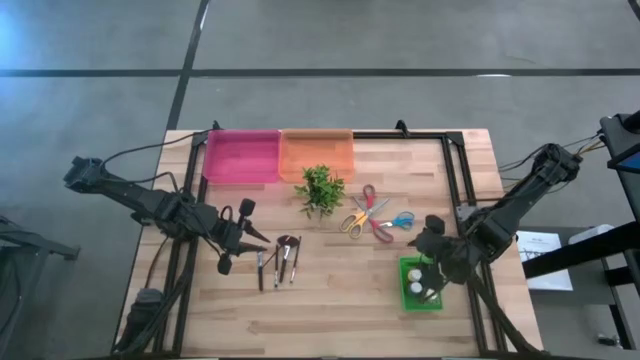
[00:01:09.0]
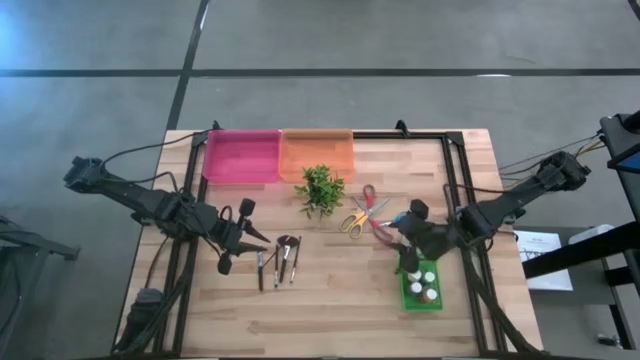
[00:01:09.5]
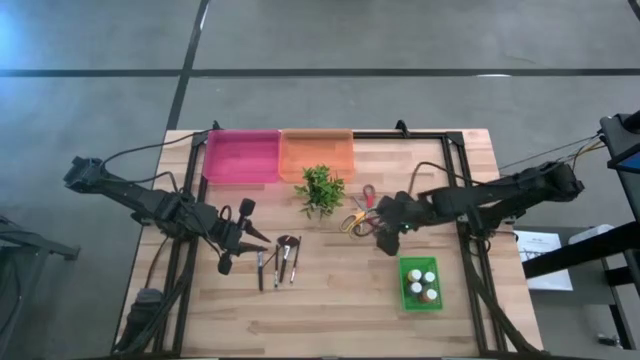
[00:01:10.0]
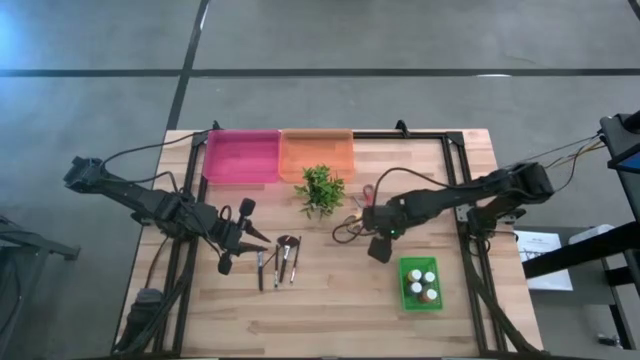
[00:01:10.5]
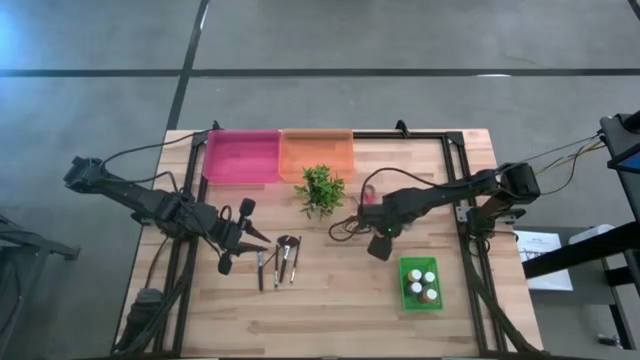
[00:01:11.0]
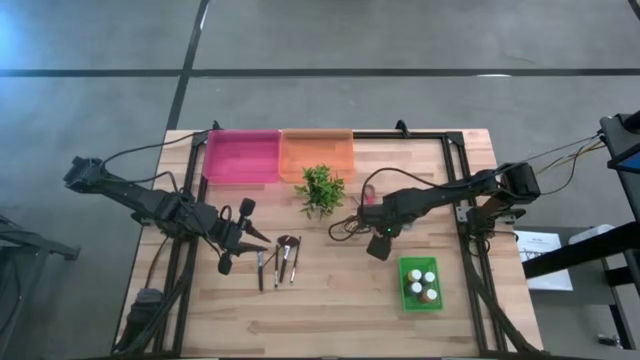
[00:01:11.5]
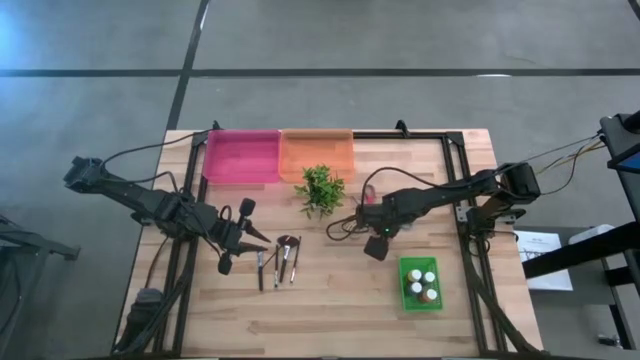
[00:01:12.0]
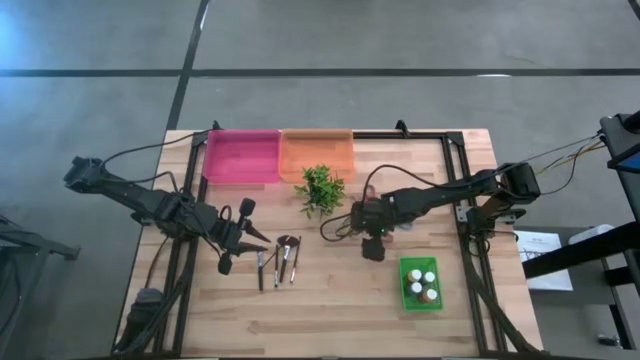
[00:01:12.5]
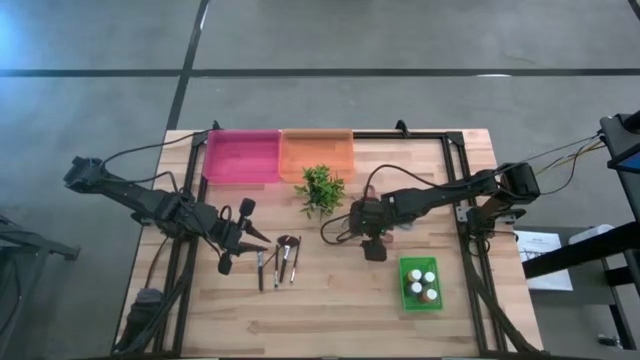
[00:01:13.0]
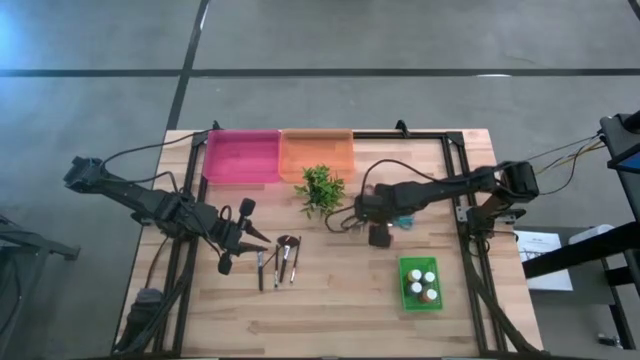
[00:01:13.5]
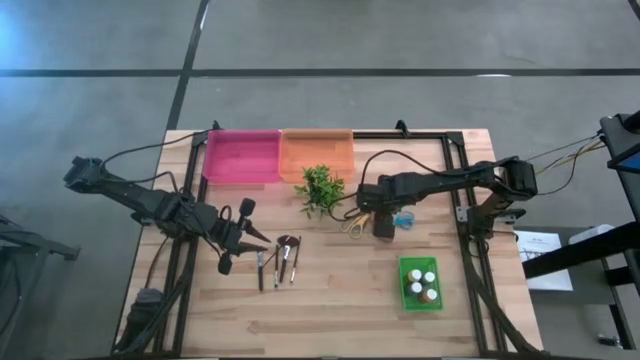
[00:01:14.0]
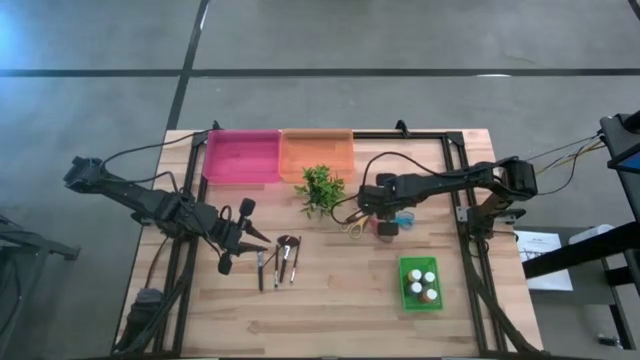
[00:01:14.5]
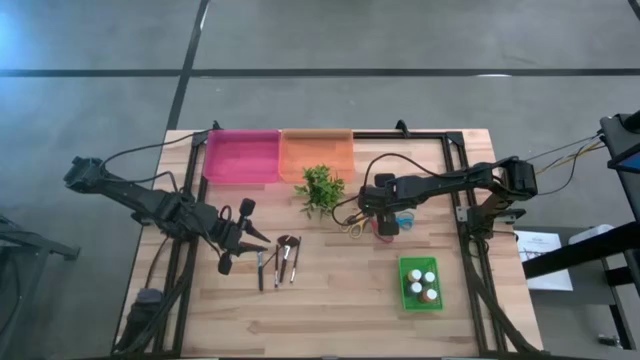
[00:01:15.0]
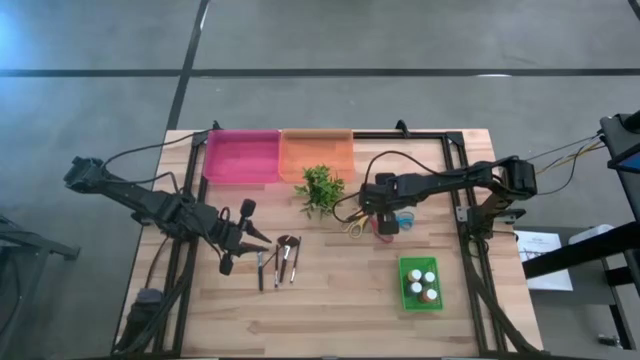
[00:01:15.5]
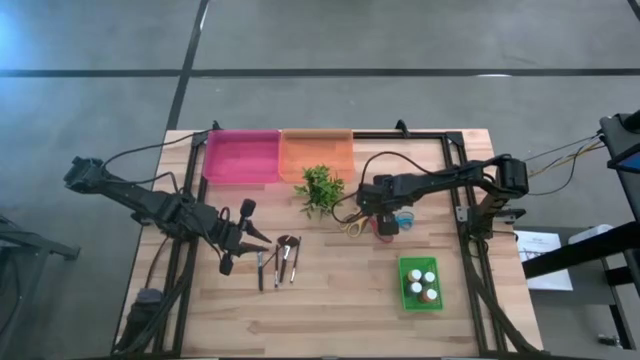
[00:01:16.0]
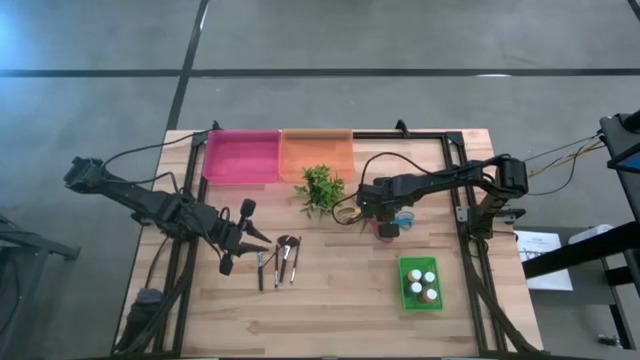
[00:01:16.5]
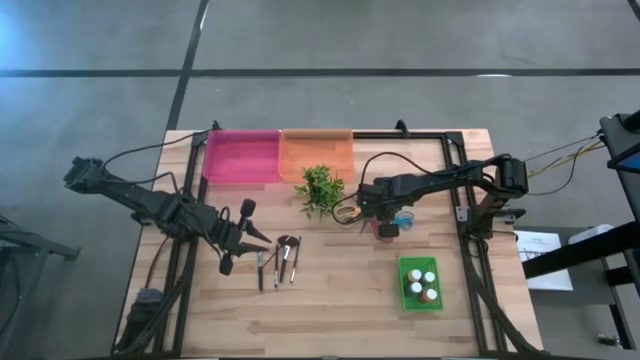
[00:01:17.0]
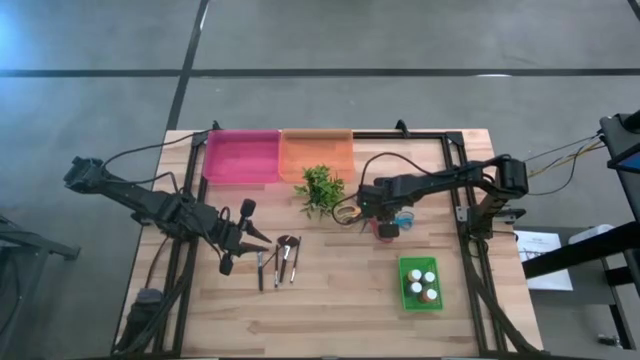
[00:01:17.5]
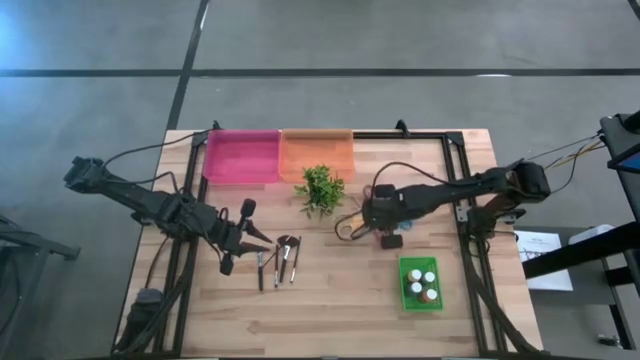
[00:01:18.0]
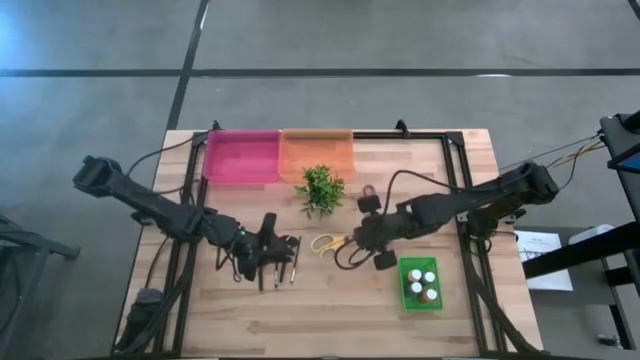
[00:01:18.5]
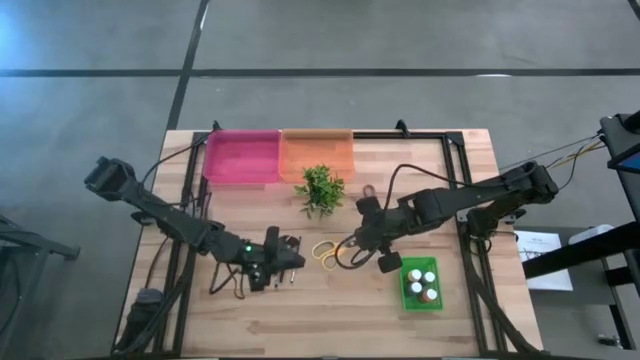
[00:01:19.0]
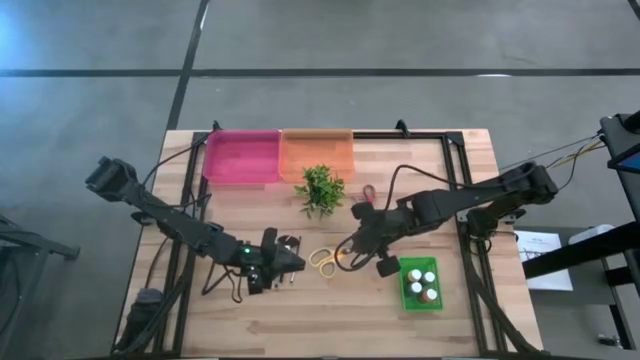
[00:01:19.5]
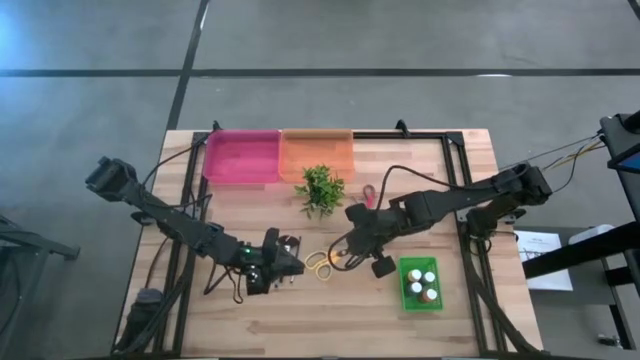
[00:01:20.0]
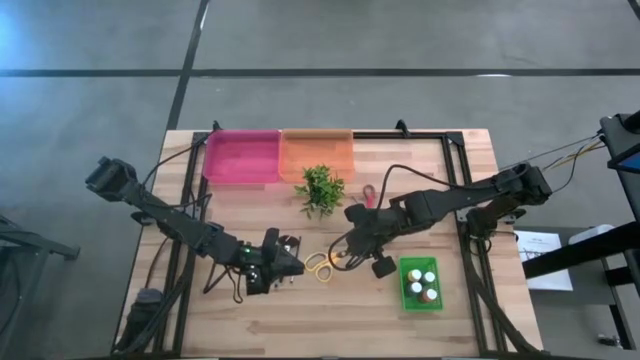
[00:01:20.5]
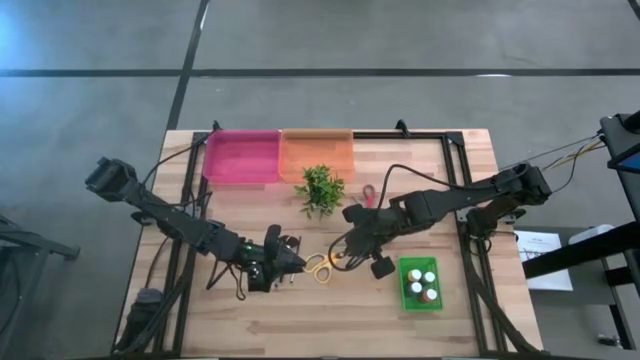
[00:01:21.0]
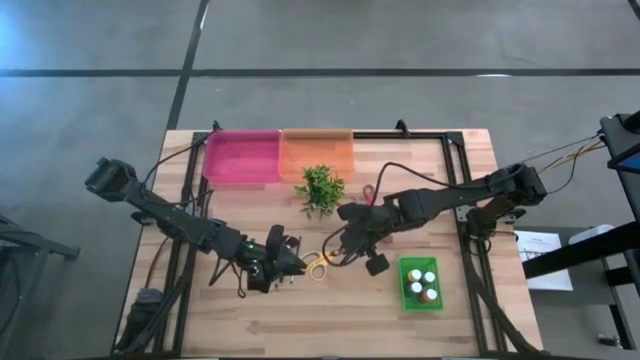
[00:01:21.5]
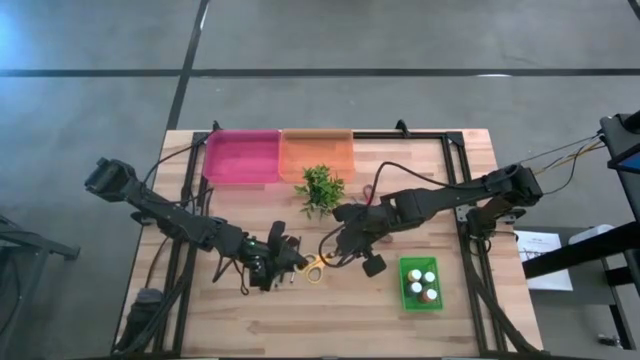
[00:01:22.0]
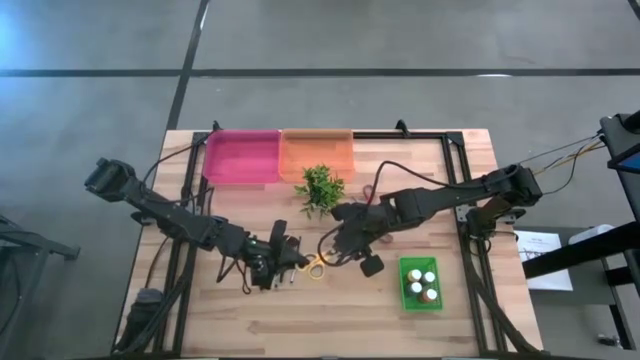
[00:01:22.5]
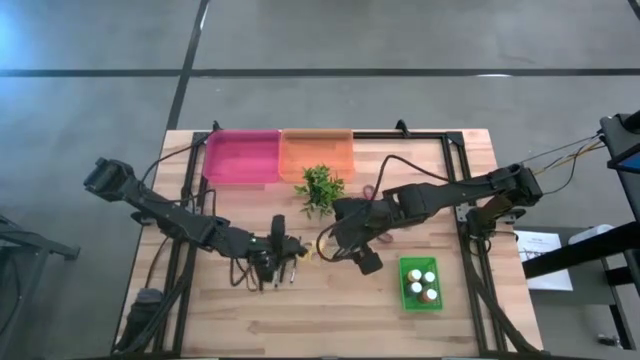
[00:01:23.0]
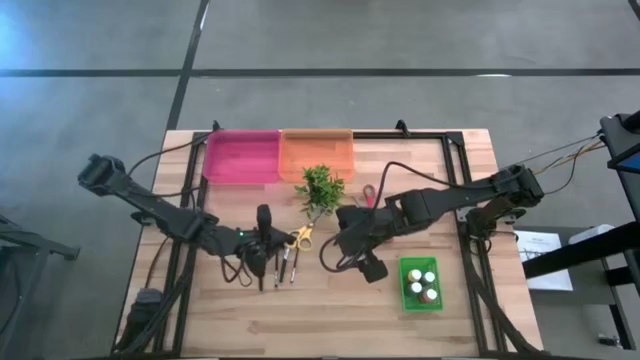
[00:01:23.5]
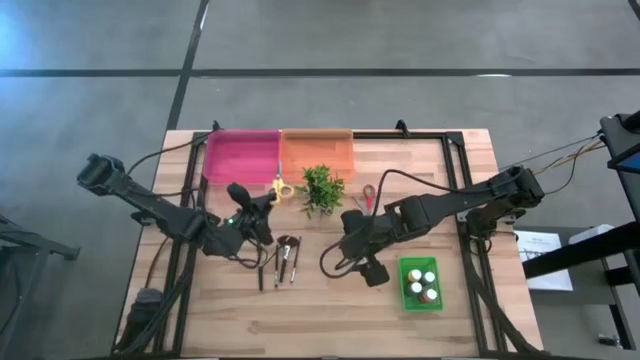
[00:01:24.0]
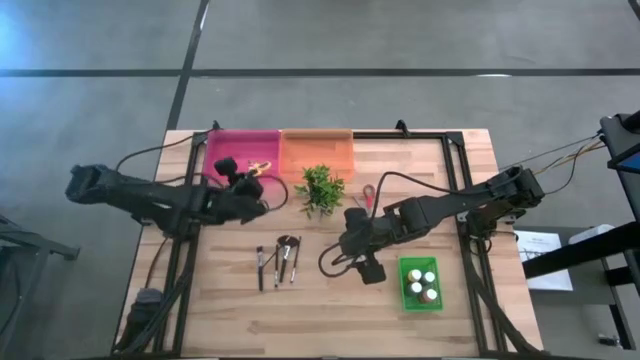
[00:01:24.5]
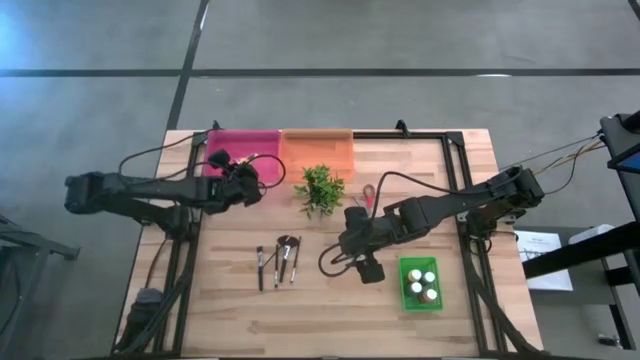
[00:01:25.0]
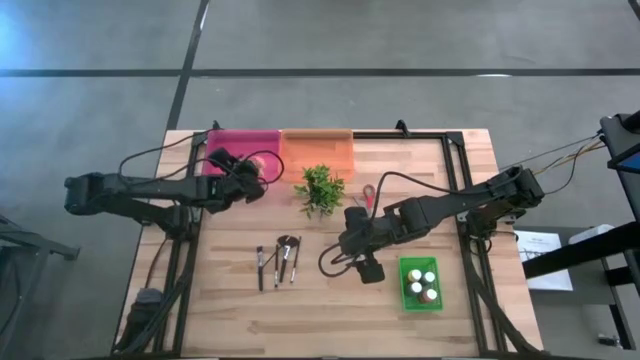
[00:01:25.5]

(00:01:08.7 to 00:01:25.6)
Task: Pick & Place Paint Supplies
Put the yellow scissors into the pink bin
